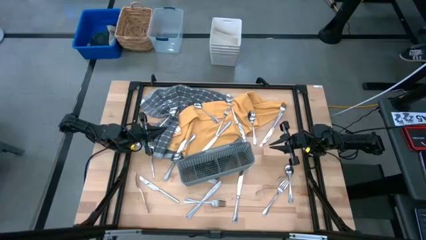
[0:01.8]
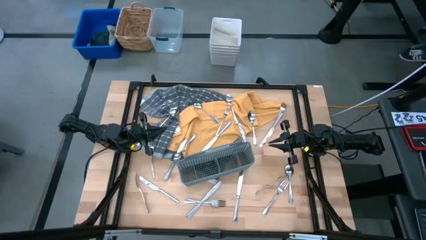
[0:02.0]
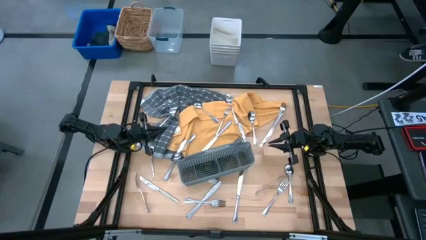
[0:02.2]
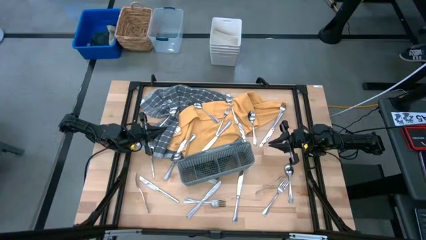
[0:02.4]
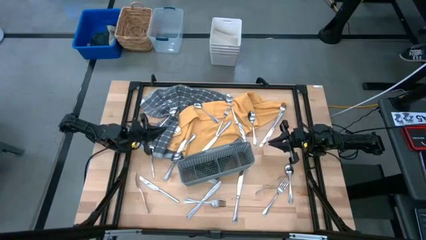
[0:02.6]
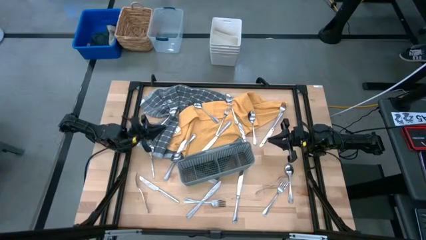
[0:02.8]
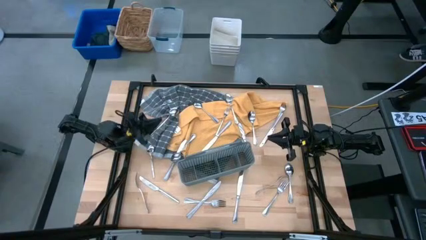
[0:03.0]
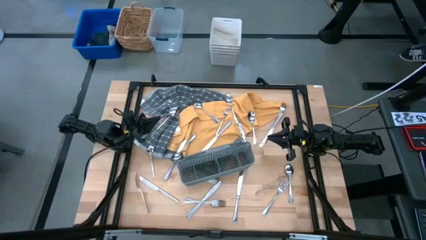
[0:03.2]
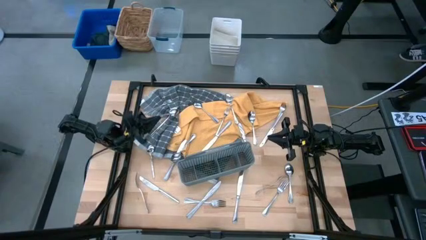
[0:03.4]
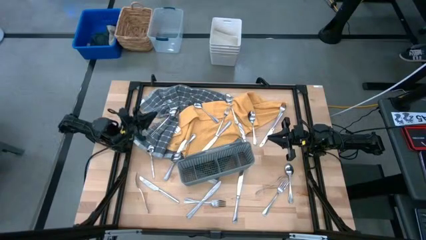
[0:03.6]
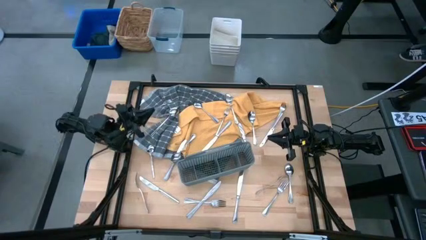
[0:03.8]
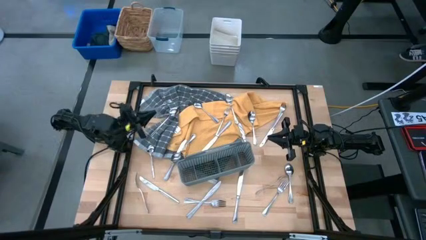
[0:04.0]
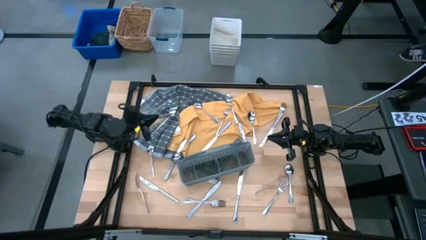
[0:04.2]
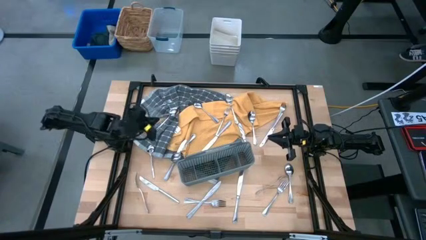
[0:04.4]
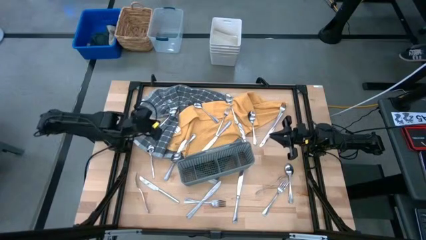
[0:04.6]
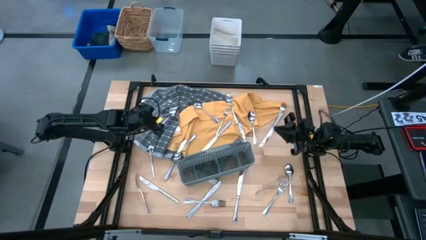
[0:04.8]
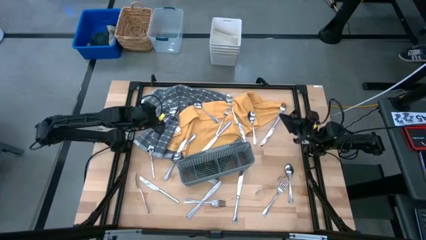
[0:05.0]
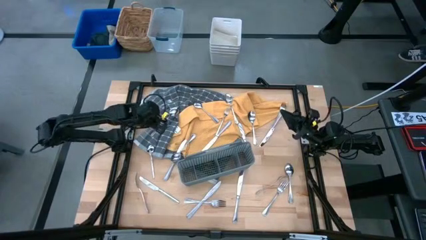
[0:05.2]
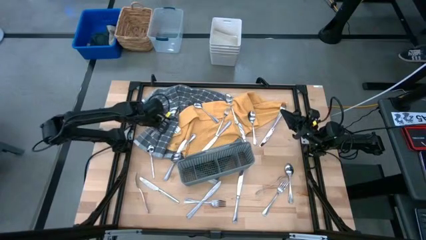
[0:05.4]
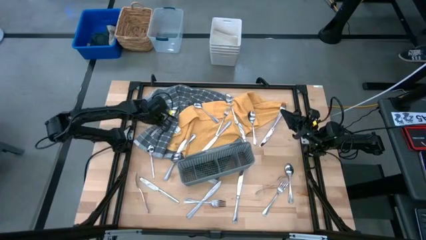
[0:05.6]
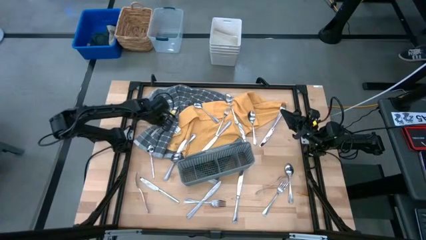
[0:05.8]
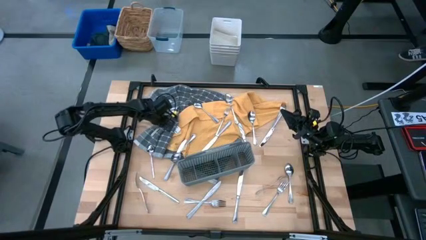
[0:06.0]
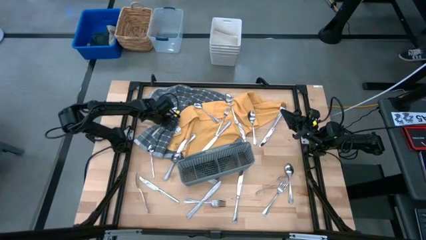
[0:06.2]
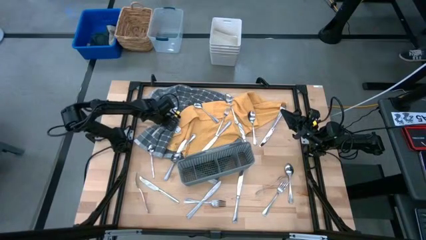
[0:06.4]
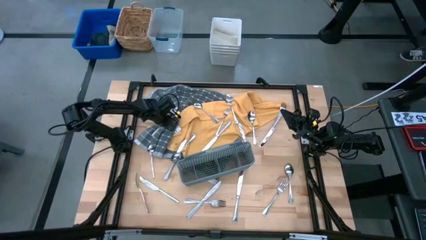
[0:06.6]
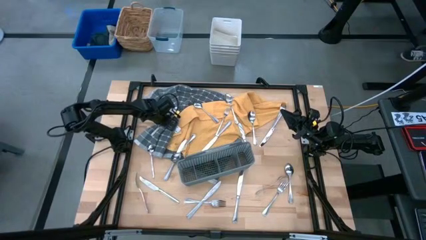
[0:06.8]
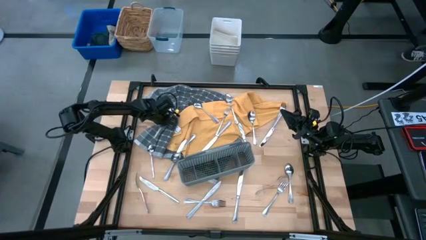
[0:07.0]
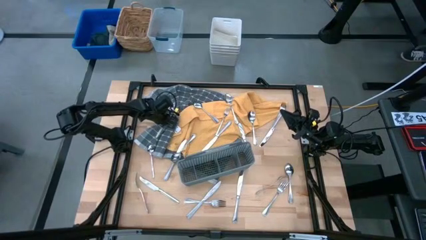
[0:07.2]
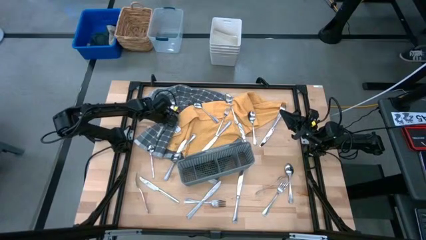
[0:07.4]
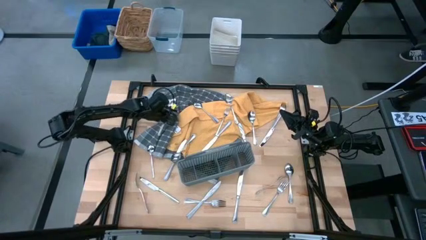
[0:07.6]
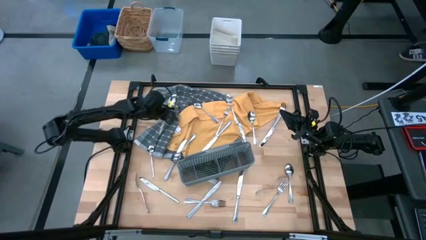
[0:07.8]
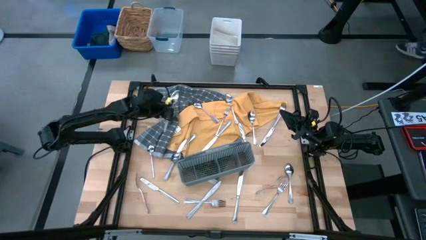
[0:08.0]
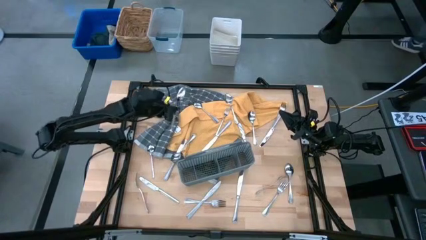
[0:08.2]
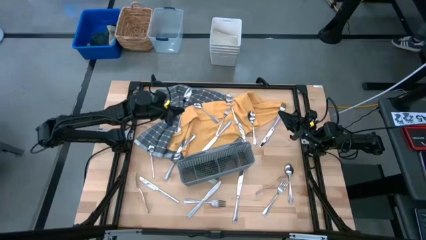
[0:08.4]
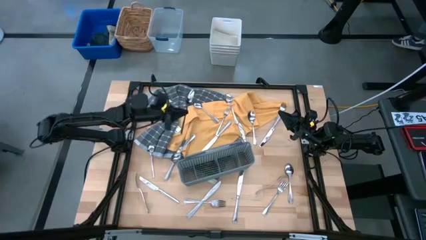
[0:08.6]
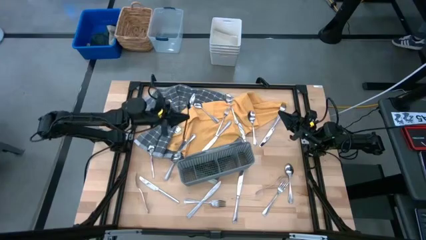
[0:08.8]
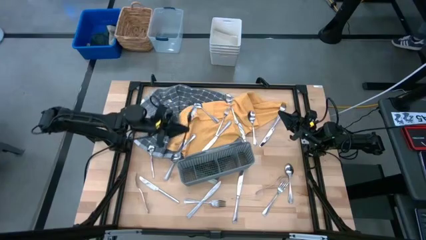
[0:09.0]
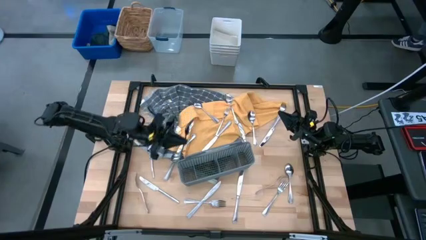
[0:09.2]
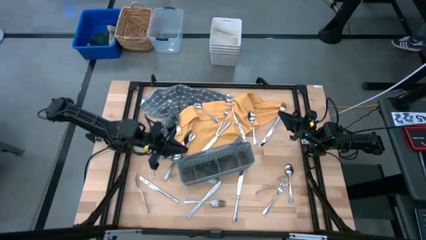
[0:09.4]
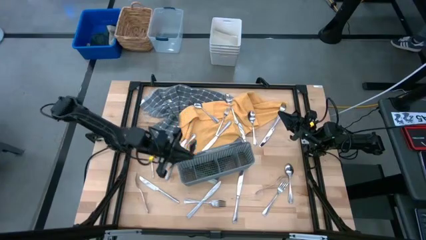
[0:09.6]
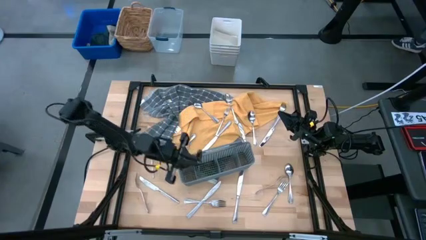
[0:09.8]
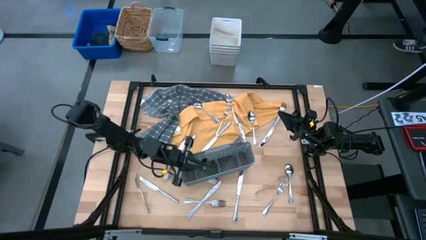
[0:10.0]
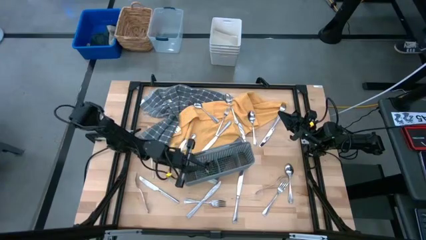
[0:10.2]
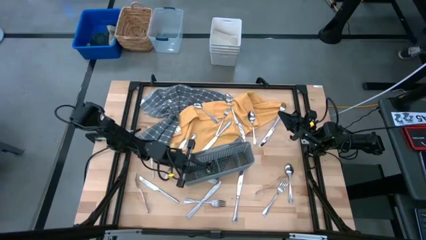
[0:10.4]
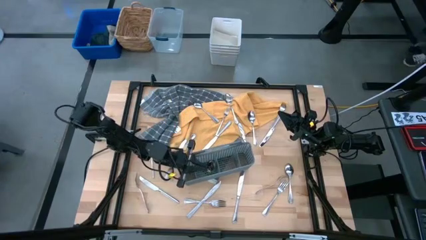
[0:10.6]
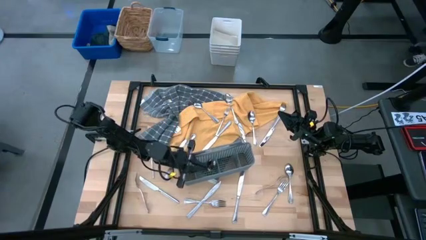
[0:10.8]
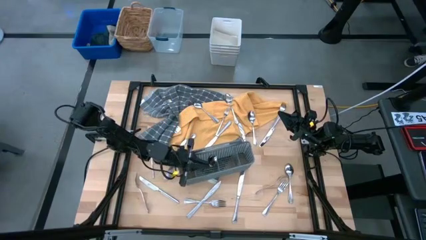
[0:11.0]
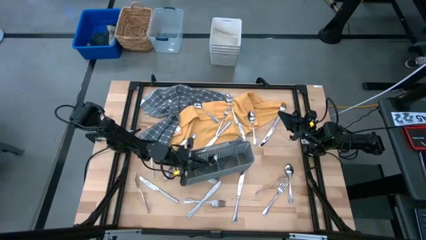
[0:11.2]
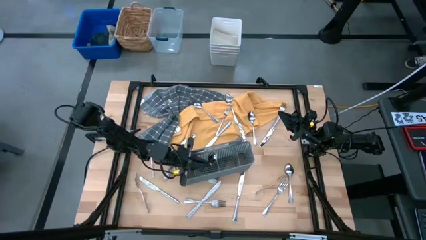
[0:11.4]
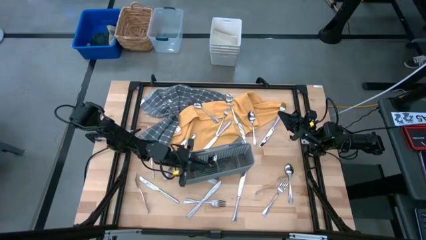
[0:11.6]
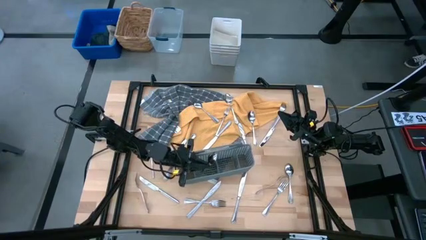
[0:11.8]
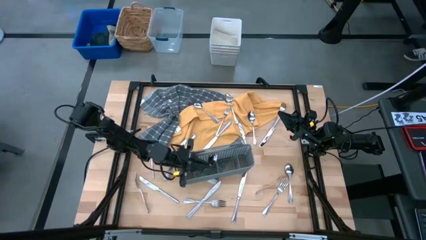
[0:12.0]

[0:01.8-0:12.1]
Task: Sort silverware
Put the silver spoon into the gray silverware basket
